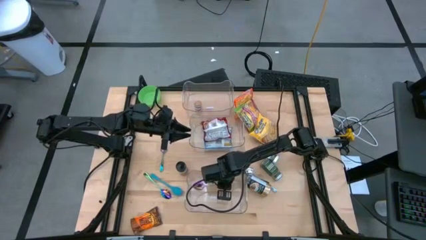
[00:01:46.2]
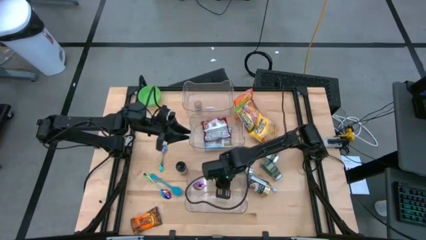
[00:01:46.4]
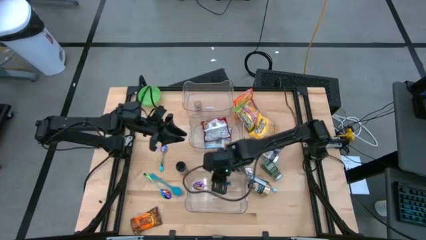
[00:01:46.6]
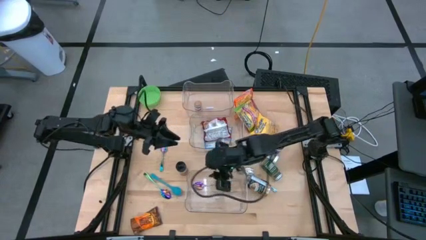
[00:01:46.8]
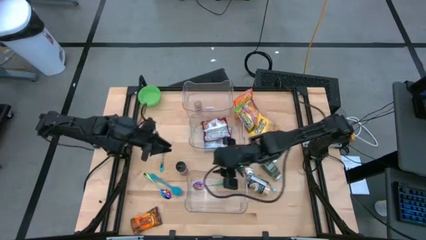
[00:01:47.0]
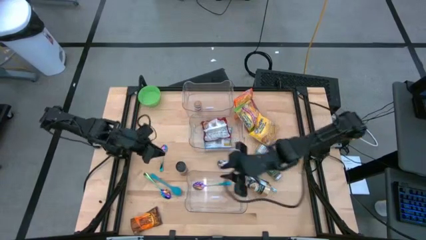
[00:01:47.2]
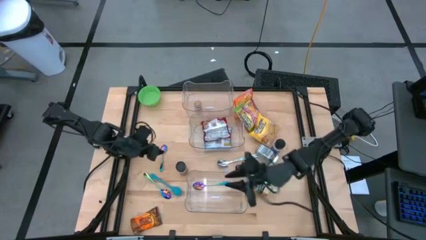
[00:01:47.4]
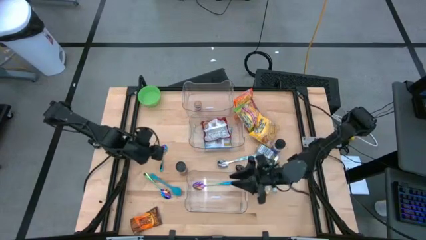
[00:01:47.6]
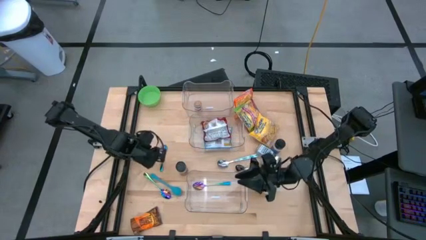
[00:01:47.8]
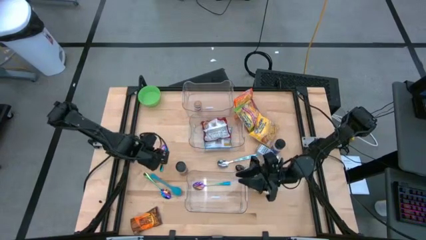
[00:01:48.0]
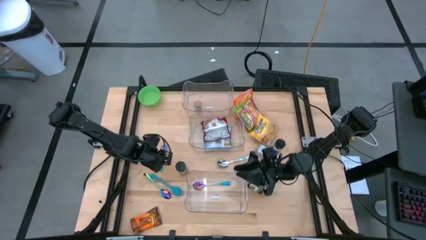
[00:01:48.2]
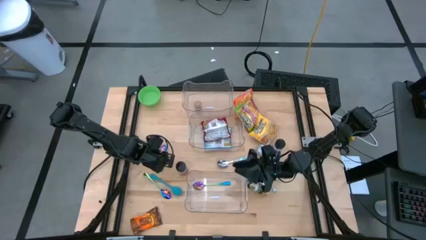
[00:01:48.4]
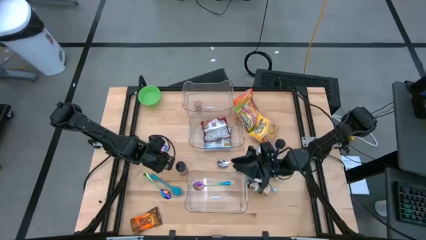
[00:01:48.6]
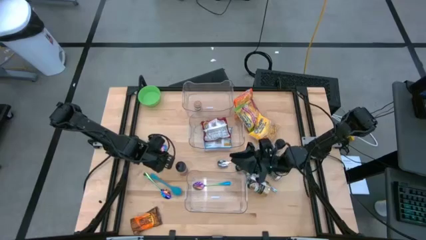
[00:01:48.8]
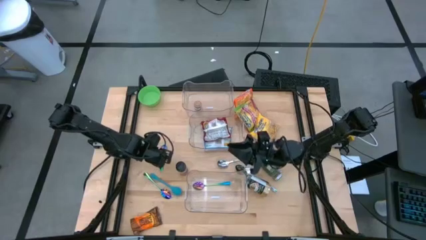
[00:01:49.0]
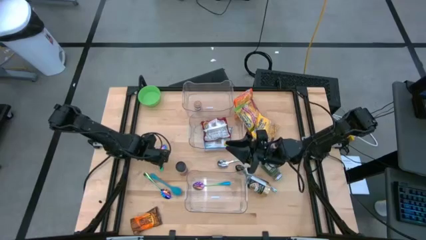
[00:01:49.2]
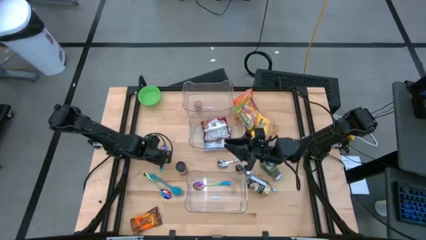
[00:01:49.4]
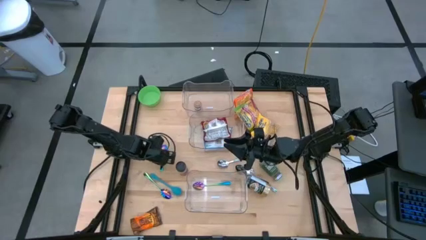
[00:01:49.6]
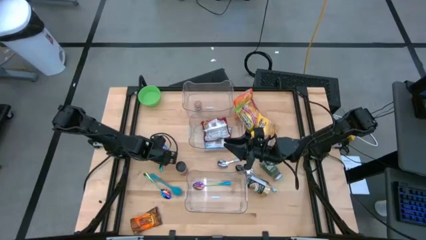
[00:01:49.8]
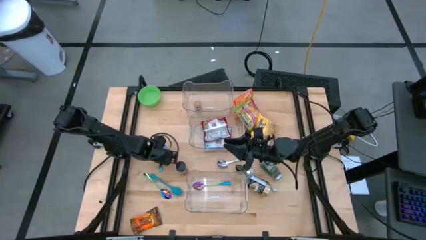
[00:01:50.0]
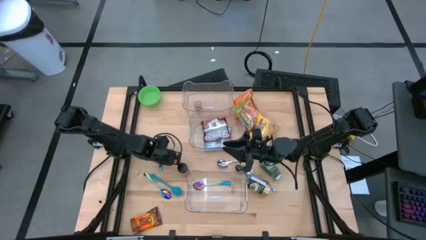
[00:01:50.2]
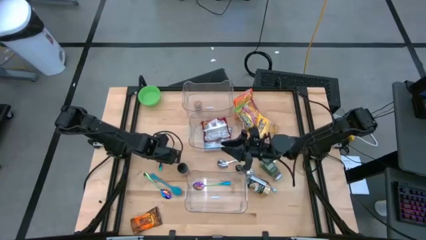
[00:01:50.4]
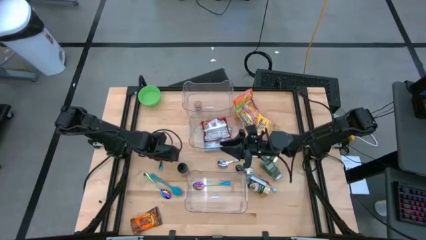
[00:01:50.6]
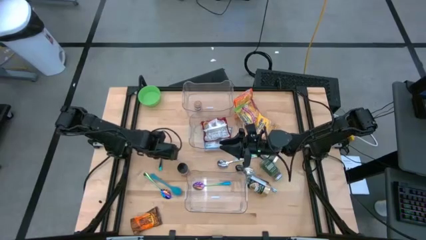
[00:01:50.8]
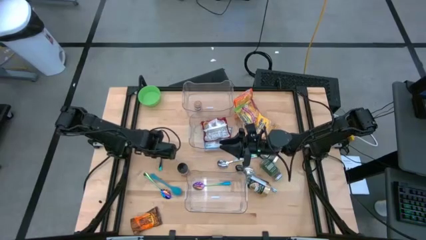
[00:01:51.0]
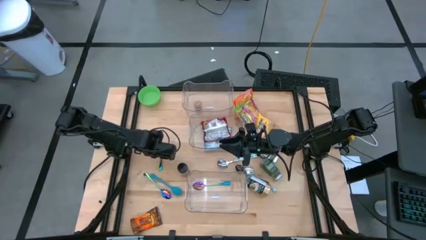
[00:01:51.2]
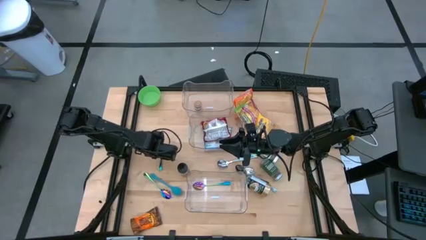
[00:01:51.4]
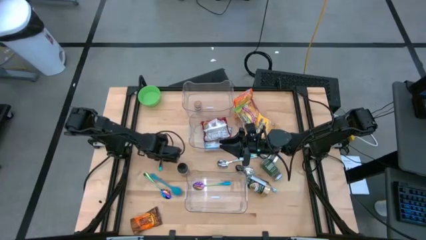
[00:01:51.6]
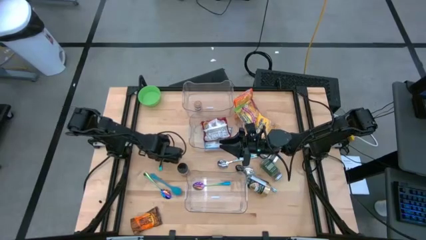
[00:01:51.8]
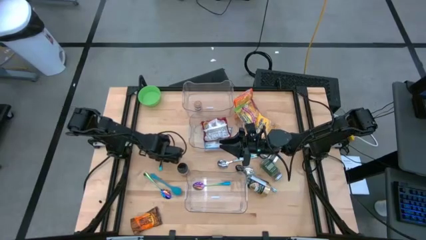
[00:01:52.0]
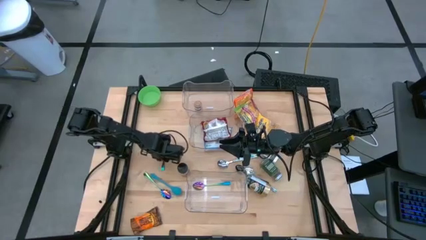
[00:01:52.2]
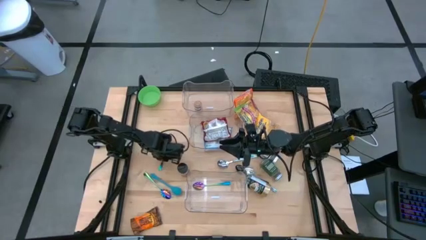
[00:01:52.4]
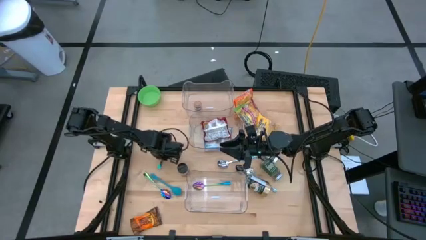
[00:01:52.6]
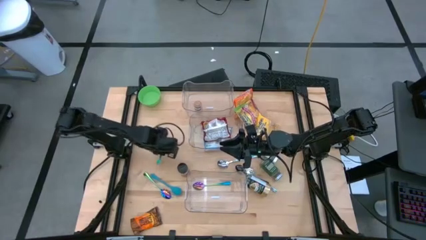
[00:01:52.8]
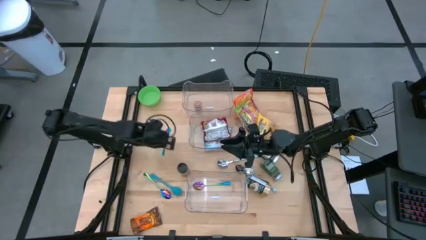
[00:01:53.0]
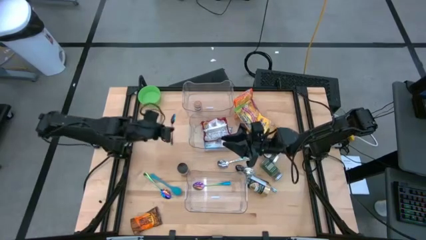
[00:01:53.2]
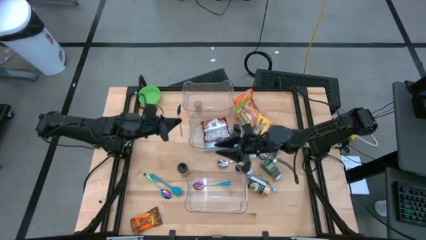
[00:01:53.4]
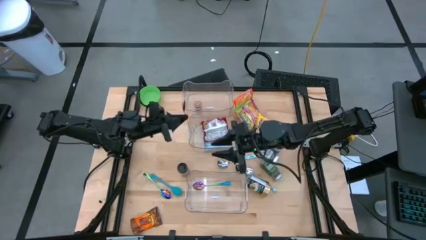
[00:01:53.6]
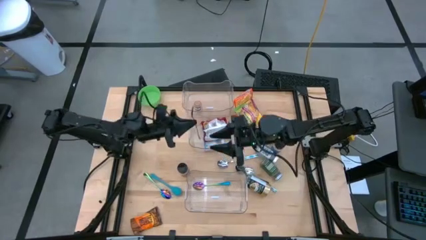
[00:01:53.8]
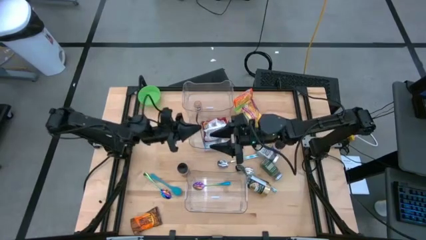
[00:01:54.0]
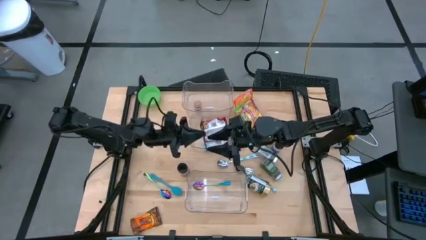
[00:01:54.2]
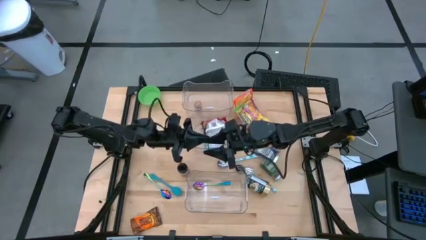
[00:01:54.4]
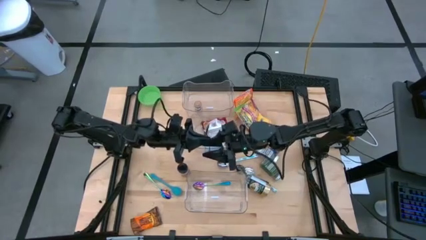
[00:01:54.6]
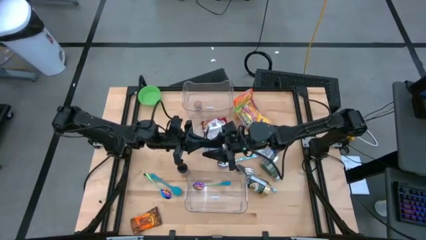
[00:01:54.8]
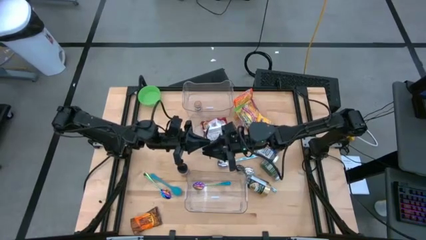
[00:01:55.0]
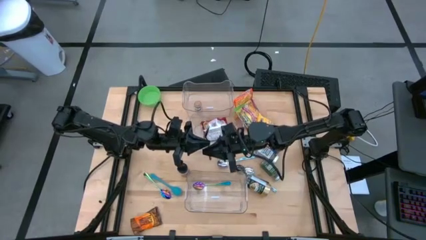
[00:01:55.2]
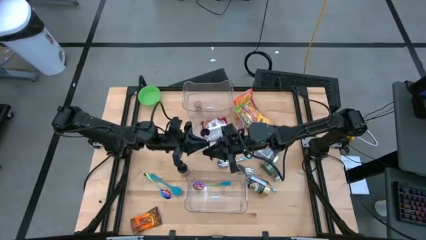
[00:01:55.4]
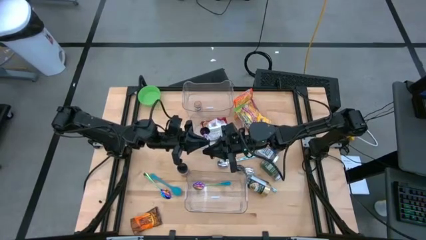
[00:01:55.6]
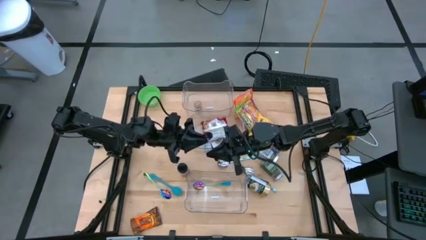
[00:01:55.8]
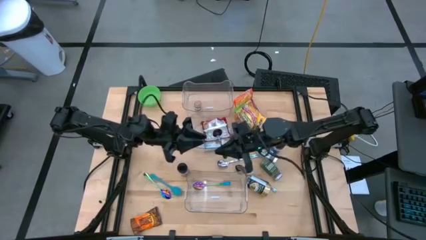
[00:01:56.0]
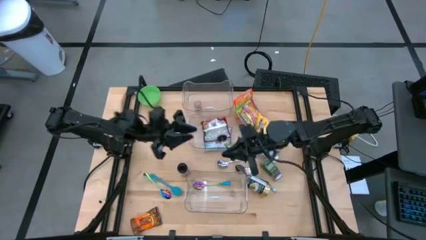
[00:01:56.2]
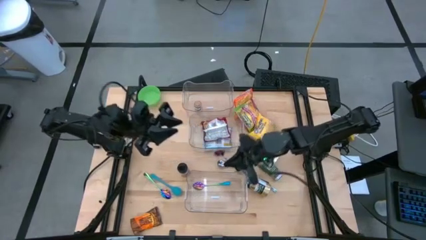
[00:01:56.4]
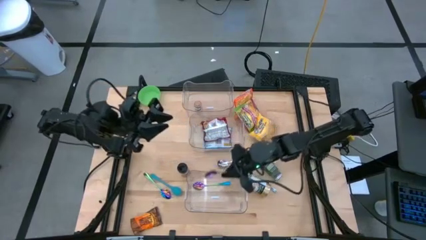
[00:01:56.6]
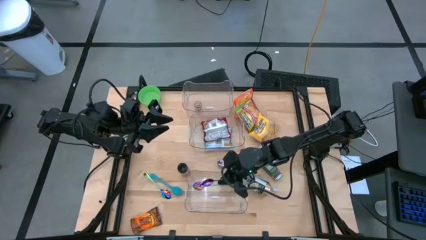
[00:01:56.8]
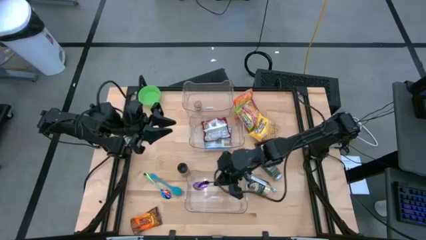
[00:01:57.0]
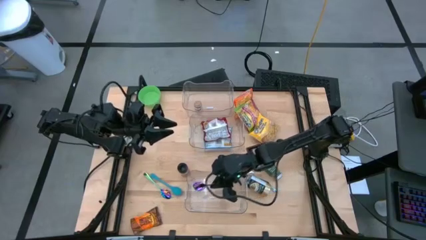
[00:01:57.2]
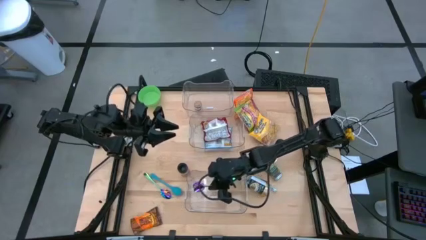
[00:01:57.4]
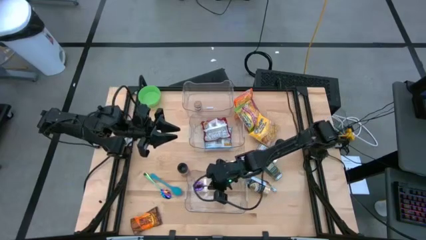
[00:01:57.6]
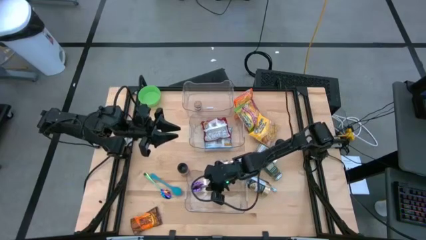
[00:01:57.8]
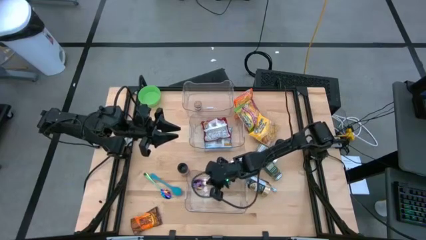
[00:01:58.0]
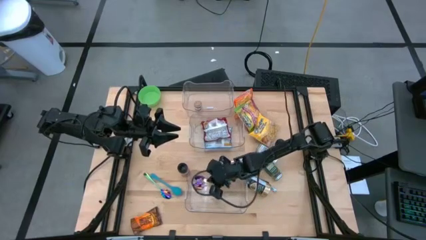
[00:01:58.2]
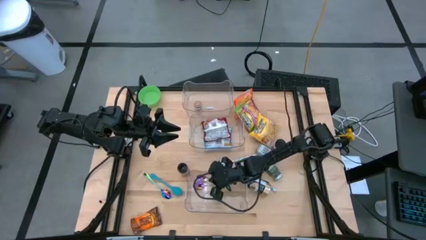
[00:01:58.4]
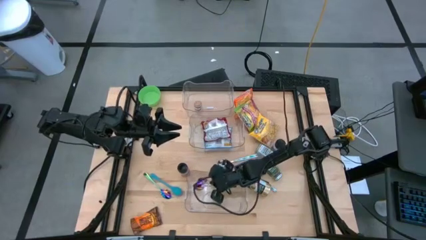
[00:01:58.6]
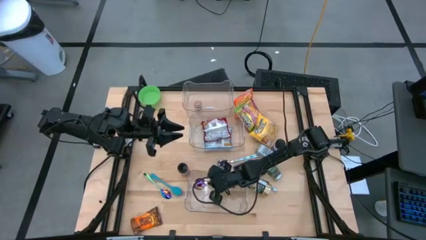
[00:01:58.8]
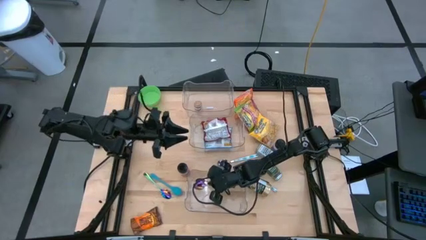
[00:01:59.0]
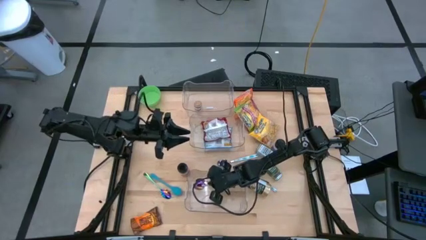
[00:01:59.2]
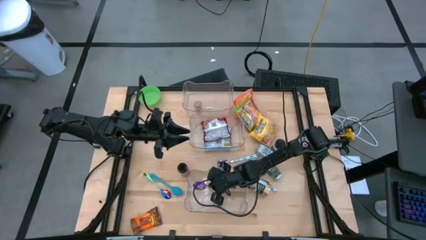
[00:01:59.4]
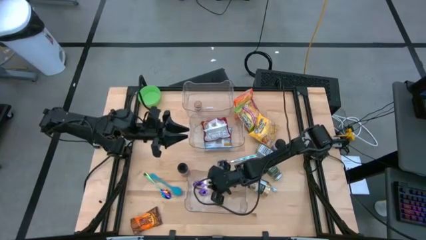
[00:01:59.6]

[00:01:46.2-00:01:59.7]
Task: Pick & Place Food Item
Put the top purple spoon into the bottom transparent bin
